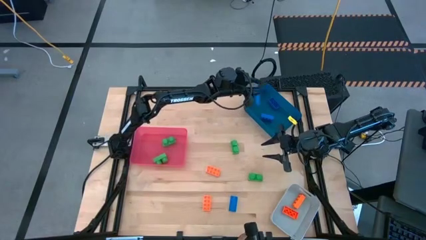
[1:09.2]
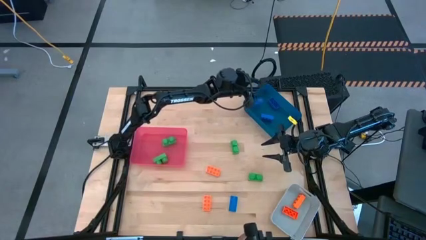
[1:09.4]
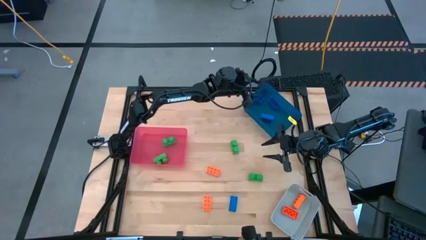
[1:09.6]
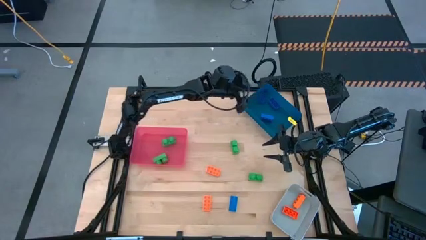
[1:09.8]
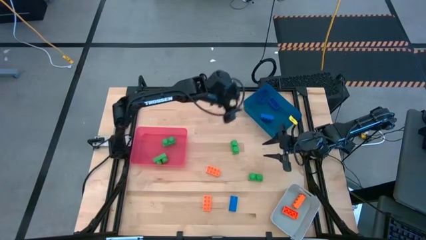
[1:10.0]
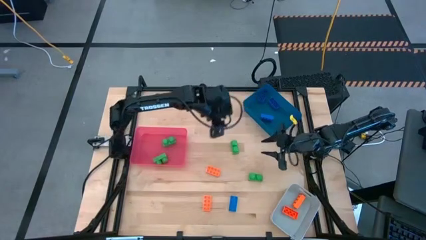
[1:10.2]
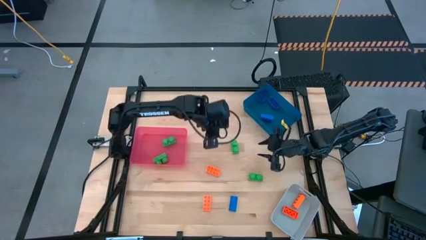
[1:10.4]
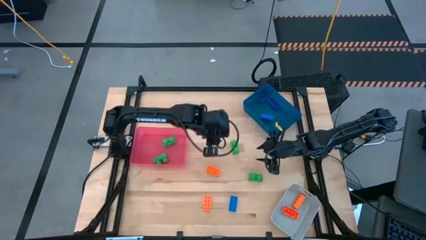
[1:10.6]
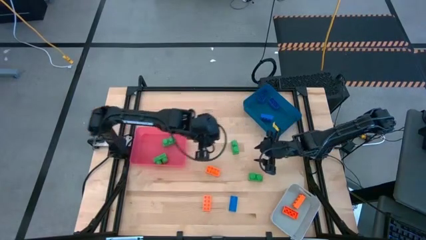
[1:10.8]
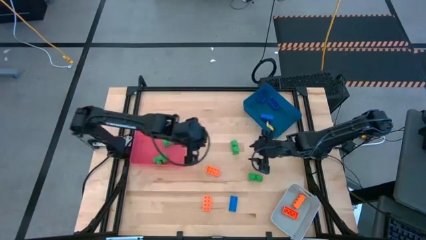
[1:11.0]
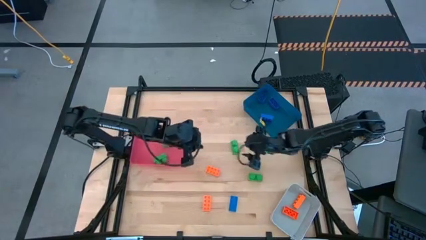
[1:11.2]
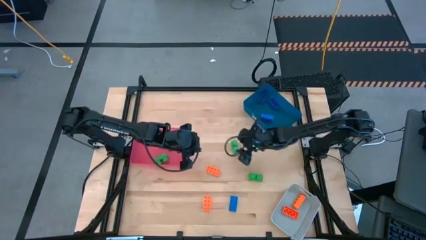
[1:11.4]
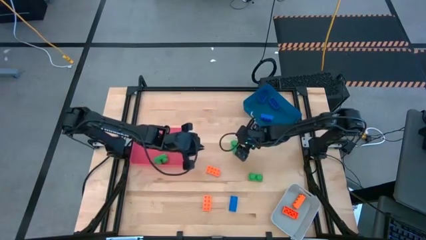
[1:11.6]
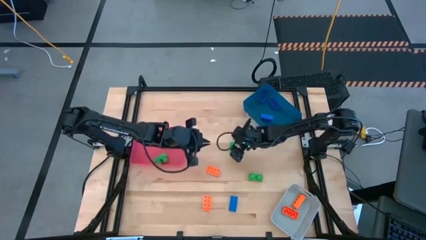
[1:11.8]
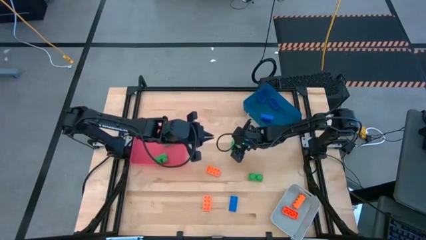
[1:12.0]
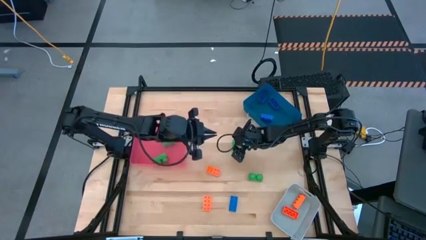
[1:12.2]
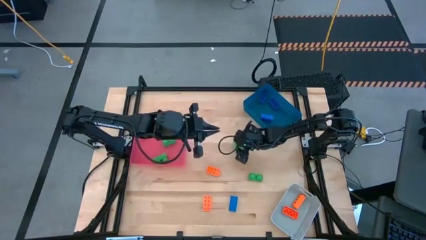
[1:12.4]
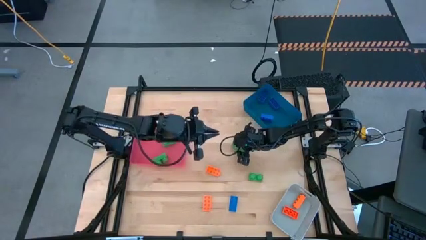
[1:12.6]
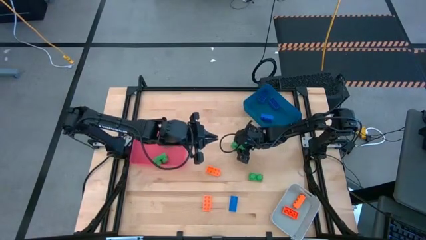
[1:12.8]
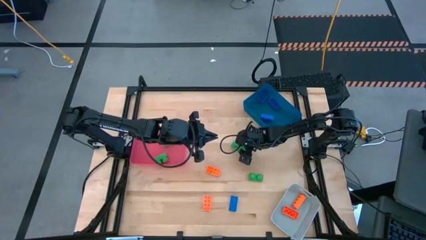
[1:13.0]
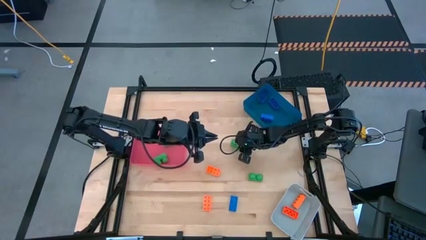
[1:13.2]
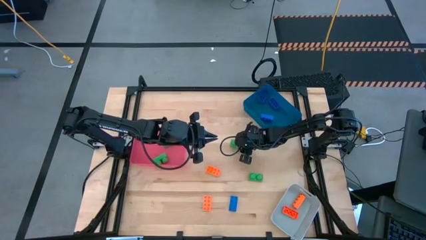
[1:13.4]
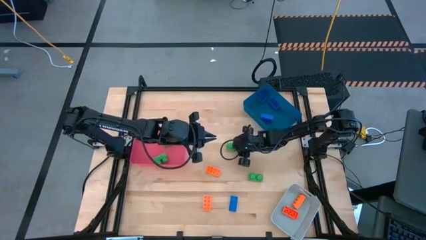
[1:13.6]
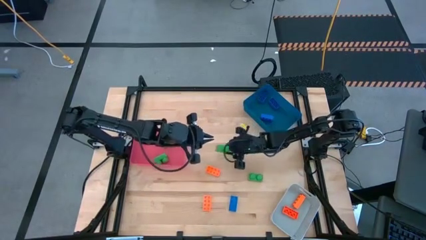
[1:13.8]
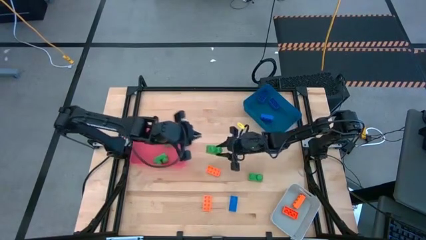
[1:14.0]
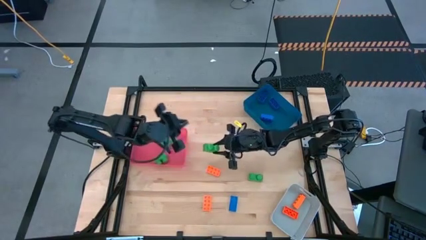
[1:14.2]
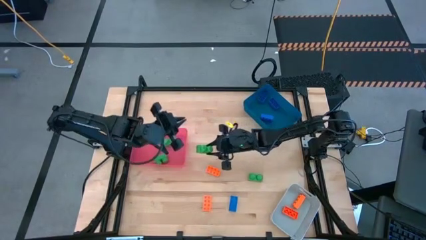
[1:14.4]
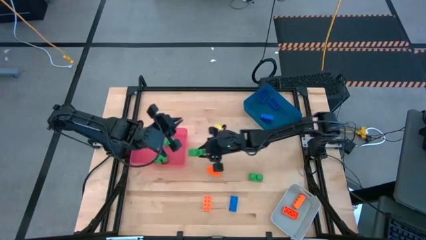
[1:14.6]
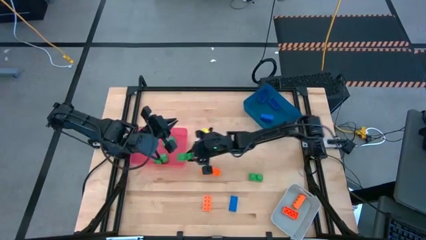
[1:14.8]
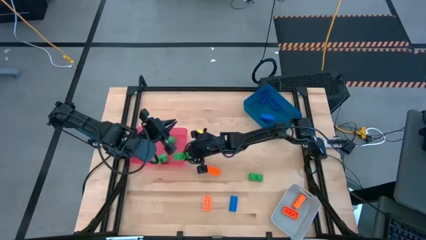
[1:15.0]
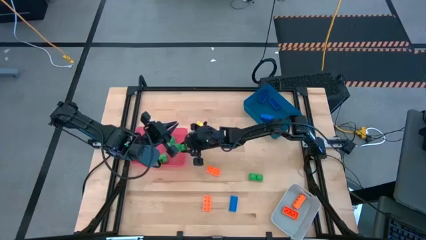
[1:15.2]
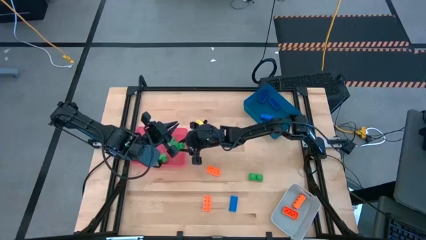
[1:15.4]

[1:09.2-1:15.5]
Task: Sort & place blocks by color
Put the green game piece into the red bin

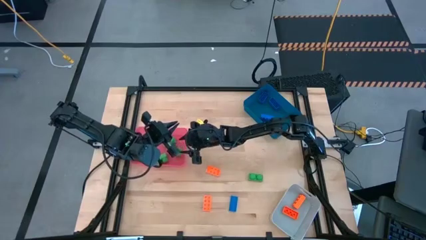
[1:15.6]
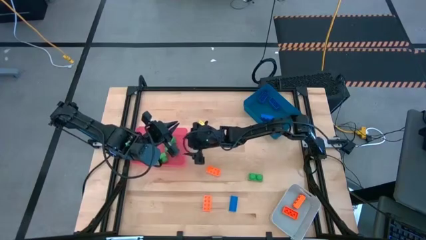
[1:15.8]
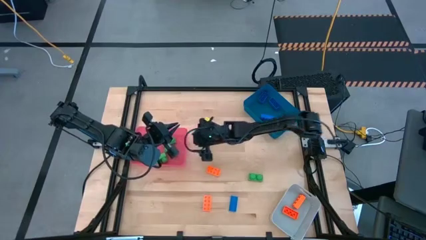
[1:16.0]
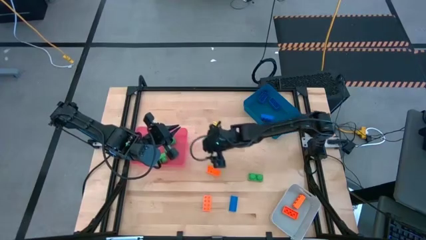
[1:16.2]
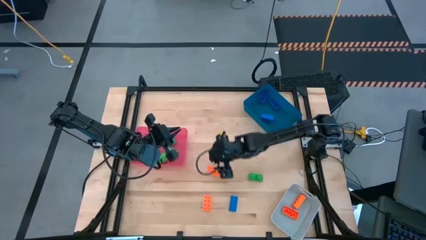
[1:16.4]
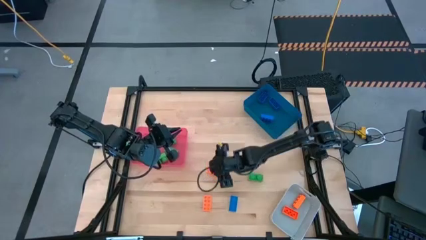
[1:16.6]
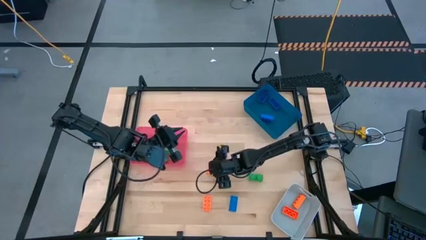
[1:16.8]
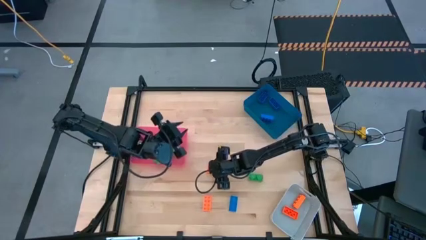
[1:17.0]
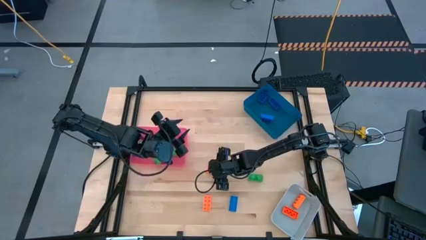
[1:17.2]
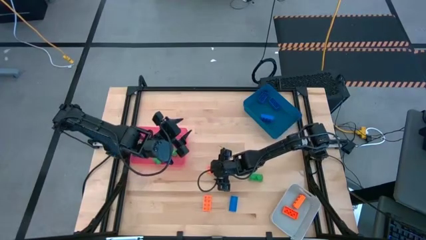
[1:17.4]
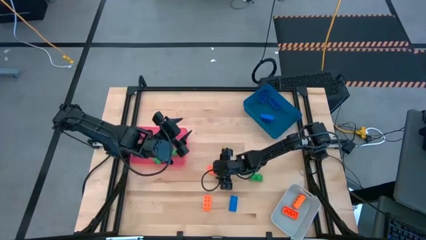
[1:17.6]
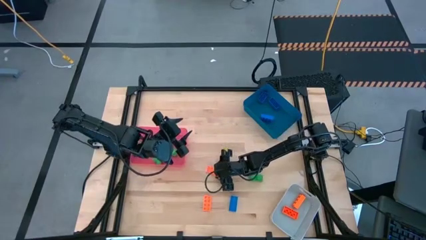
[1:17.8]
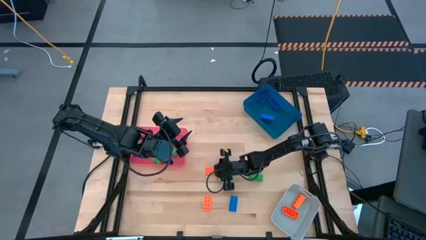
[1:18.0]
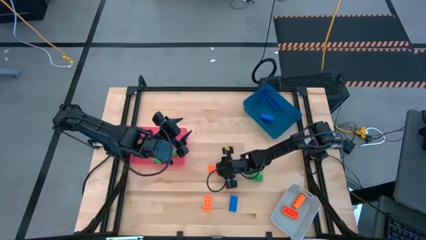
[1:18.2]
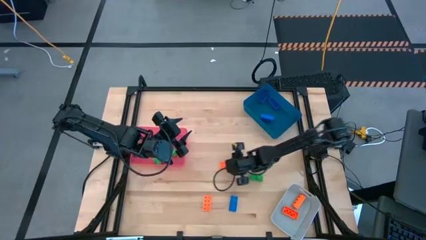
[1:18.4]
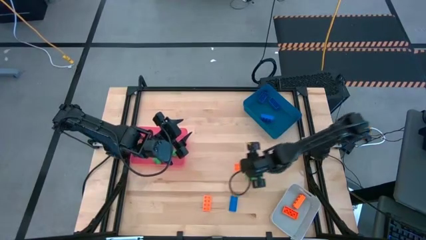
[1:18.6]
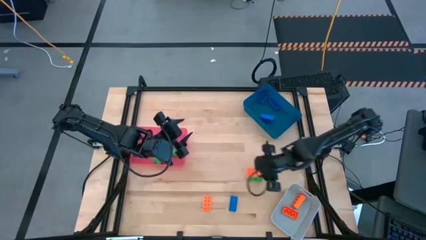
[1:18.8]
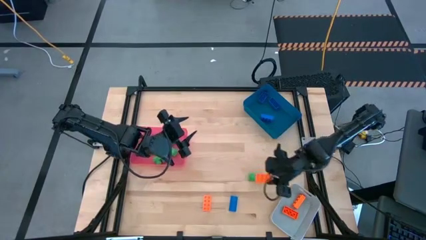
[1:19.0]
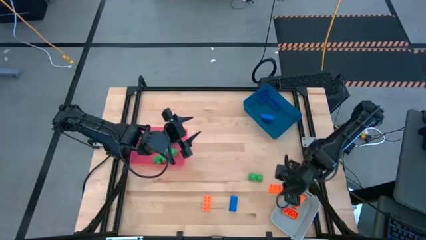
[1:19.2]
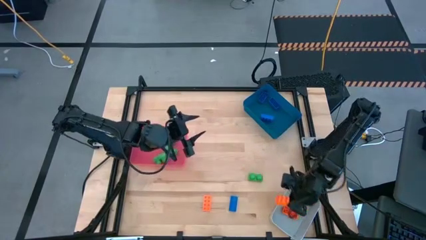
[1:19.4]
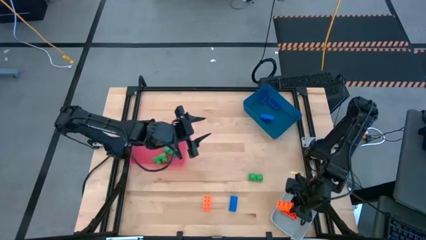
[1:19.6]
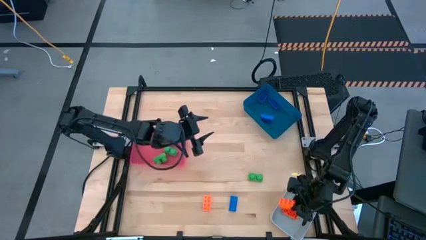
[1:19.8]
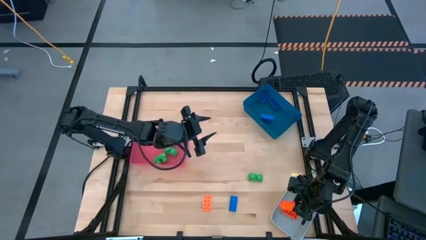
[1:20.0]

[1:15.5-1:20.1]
Put the orange game piece into the gray bin

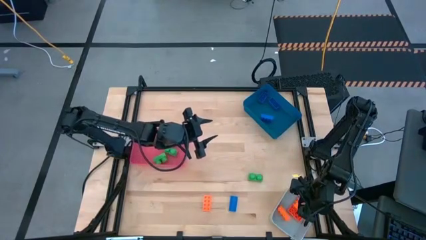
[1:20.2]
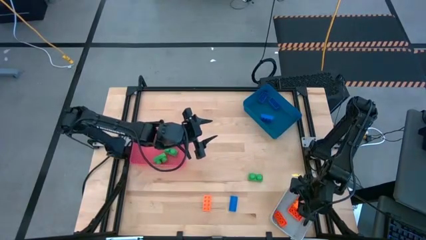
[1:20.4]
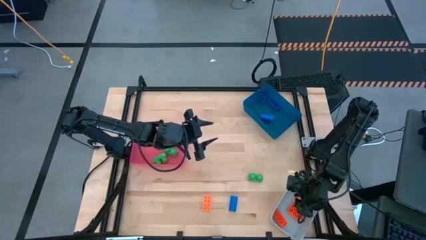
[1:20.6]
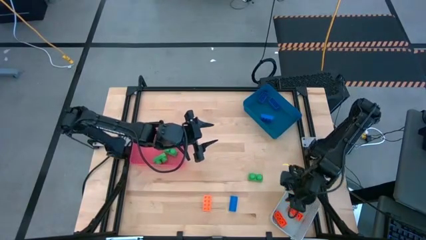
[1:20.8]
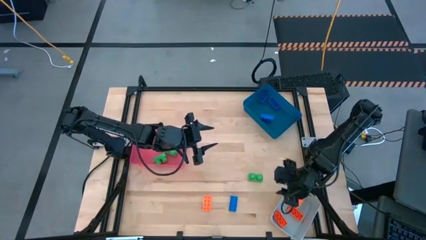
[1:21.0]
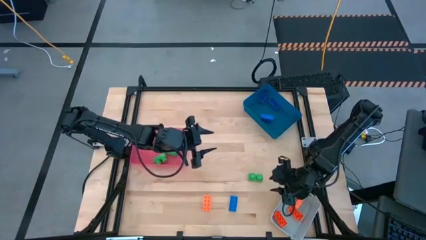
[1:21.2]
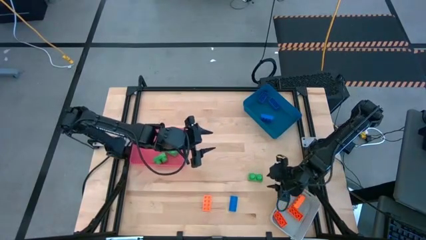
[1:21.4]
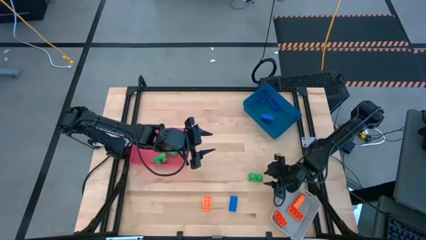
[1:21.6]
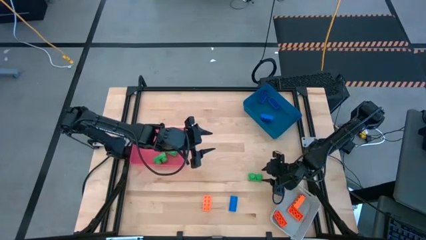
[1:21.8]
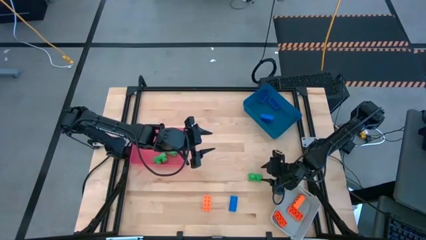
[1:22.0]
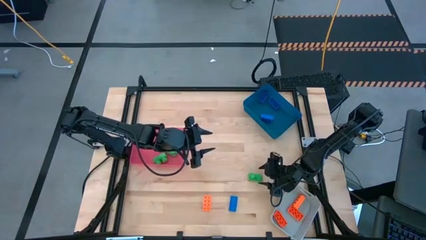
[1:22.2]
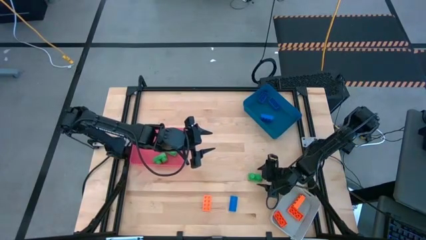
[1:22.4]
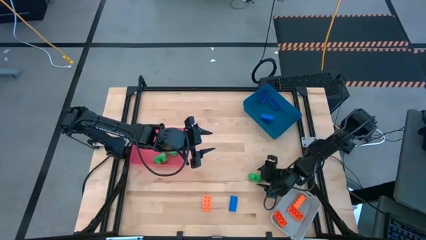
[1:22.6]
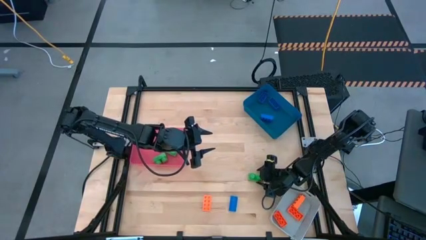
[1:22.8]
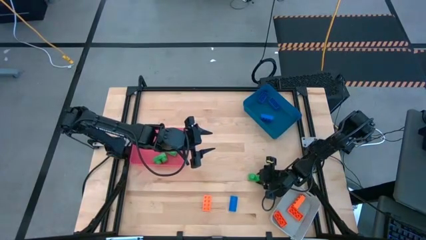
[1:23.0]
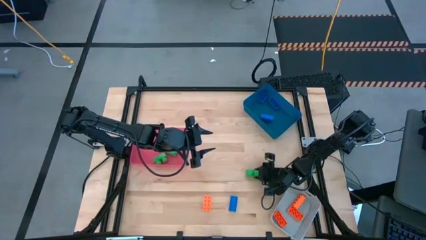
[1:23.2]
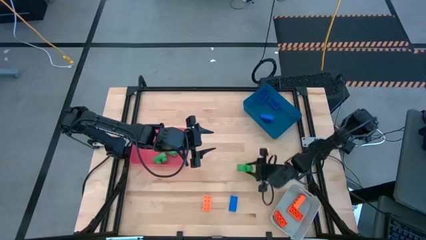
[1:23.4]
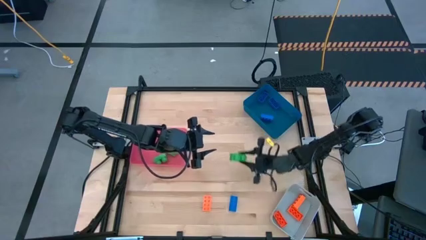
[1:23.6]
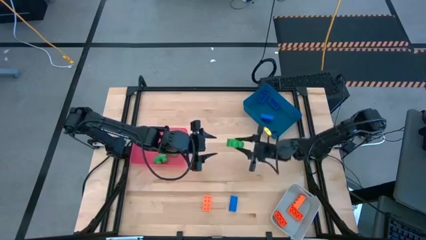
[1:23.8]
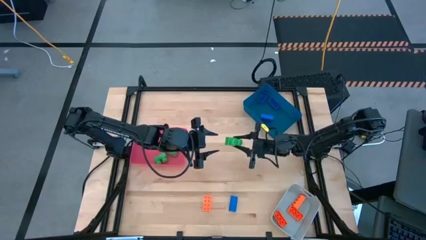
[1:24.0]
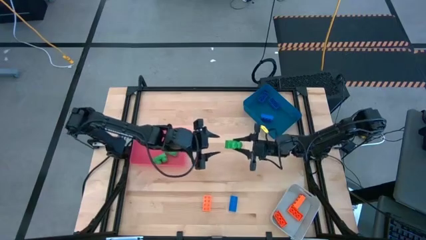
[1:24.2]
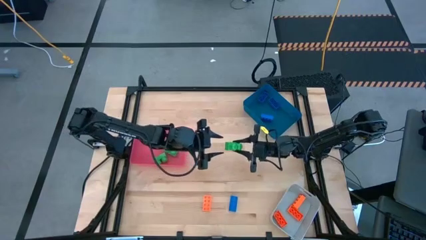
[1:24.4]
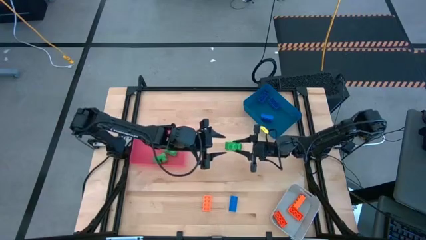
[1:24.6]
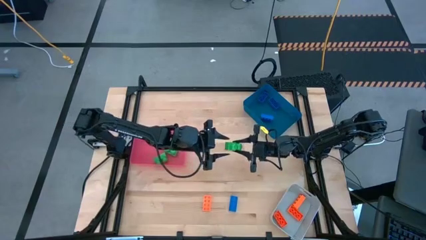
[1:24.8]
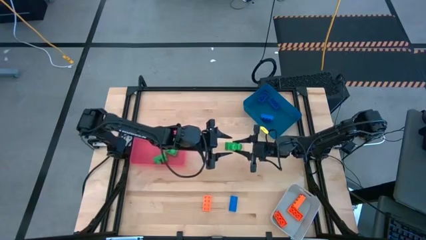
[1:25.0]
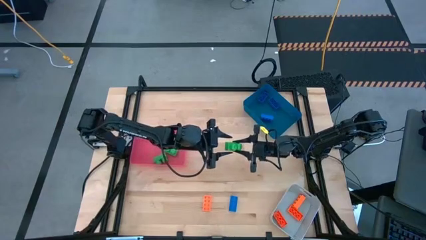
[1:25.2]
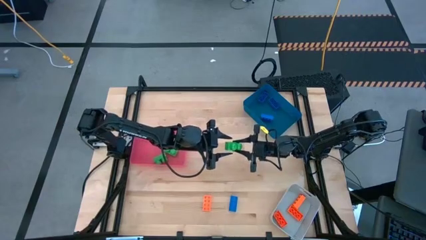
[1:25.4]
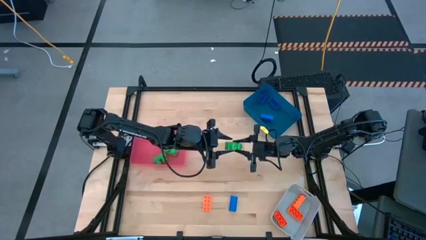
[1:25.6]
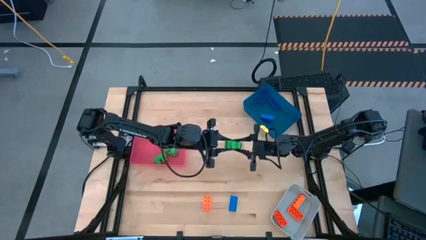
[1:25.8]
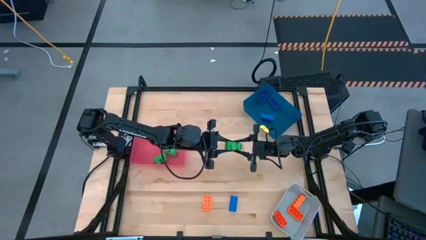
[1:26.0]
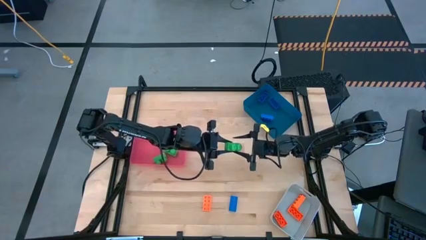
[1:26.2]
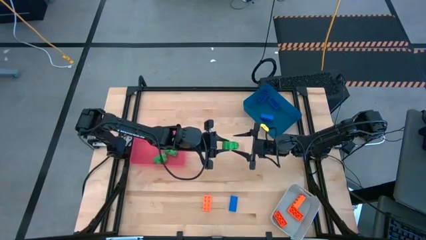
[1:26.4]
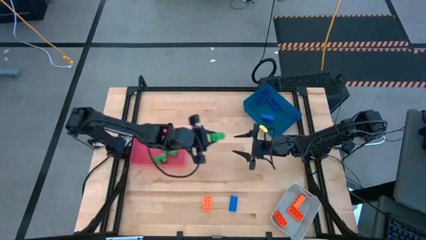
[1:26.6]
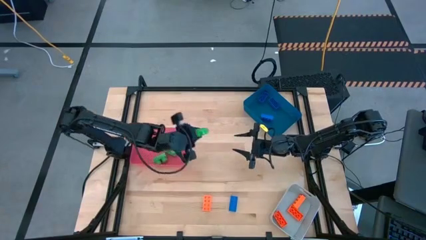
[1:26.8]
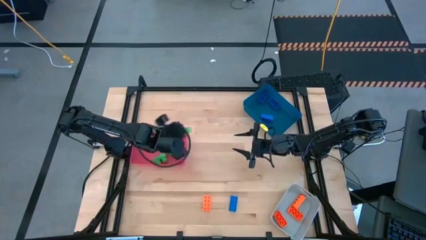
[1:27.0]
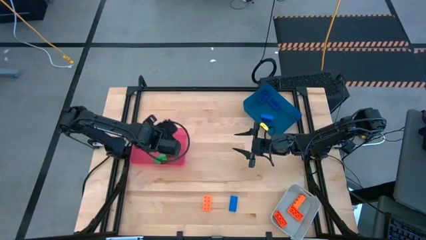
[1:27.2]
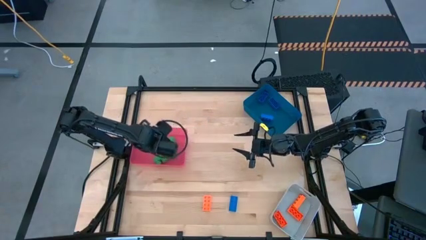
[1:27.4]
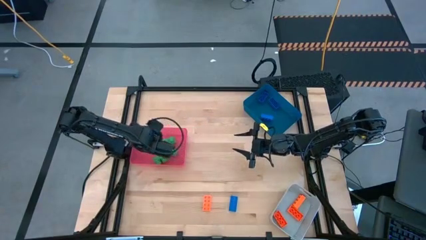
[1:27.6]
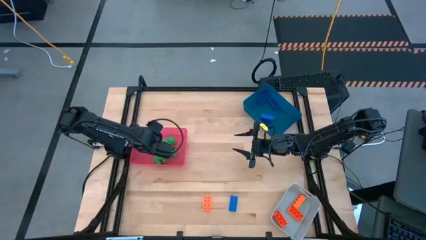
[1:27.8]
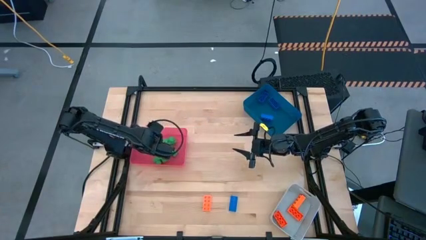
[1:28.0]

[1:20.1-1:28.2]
Put the green game piece into the red bin
